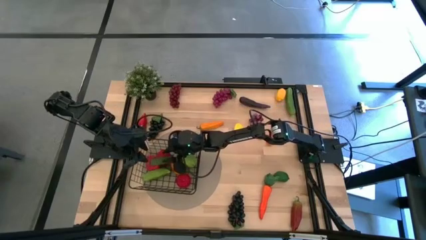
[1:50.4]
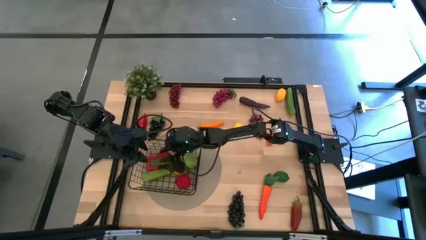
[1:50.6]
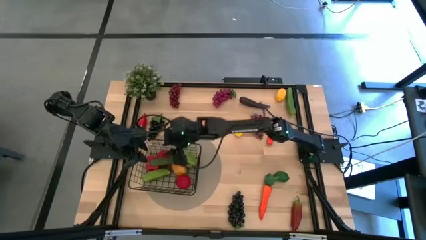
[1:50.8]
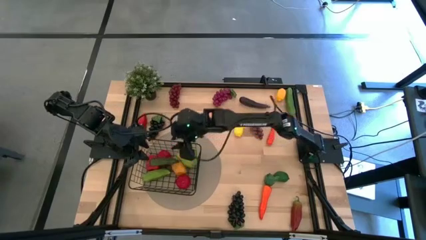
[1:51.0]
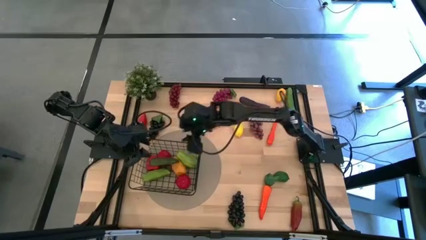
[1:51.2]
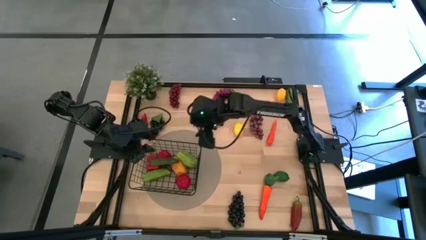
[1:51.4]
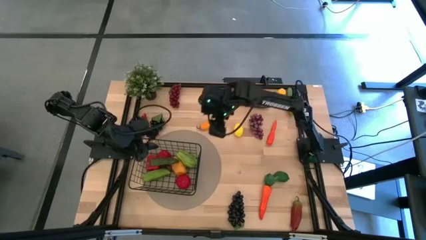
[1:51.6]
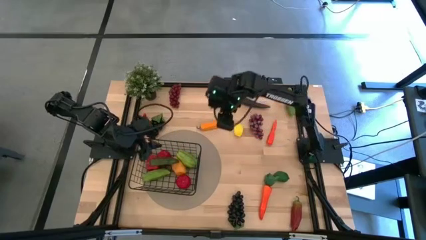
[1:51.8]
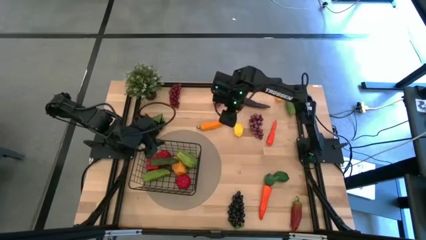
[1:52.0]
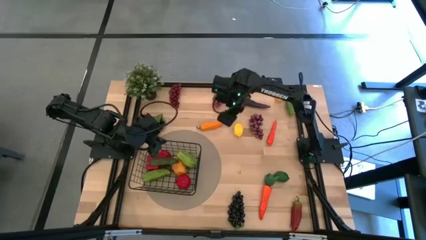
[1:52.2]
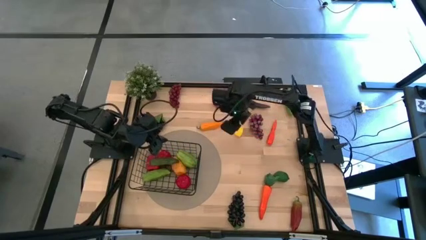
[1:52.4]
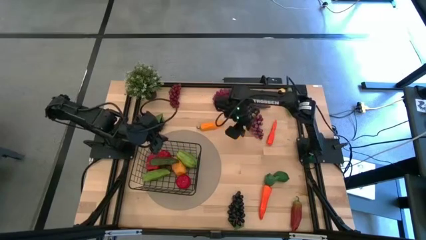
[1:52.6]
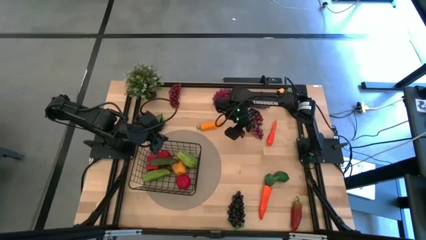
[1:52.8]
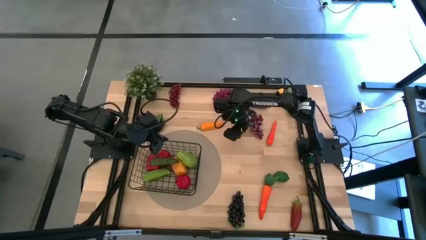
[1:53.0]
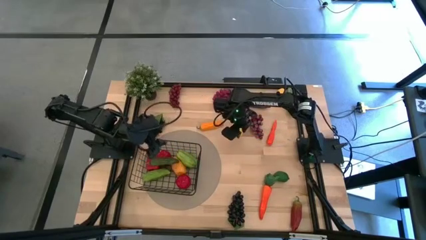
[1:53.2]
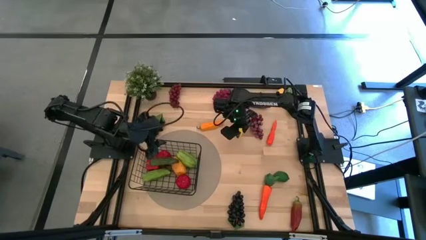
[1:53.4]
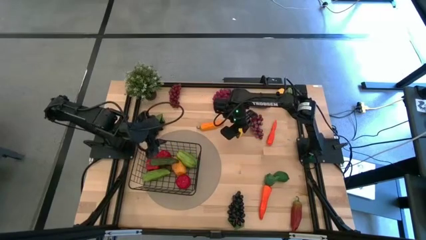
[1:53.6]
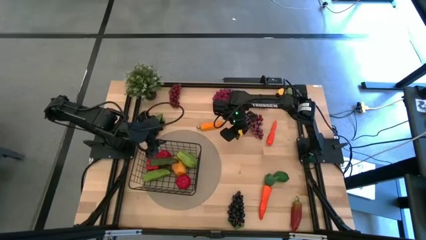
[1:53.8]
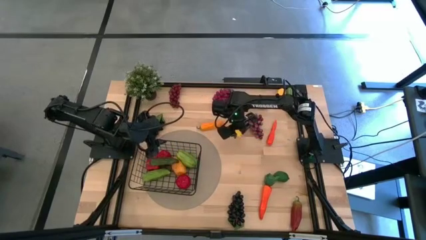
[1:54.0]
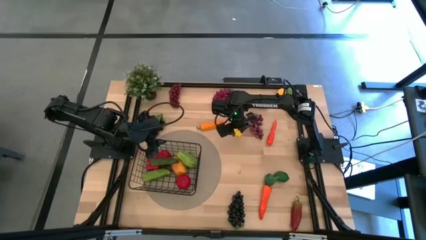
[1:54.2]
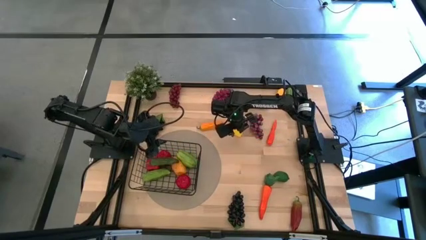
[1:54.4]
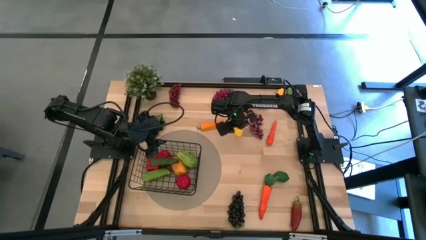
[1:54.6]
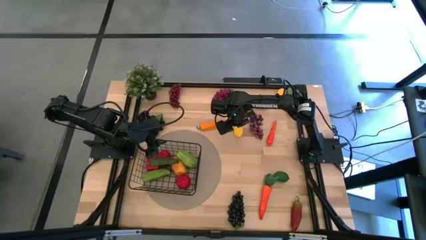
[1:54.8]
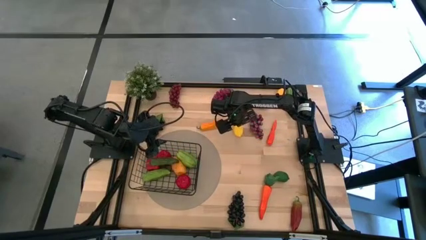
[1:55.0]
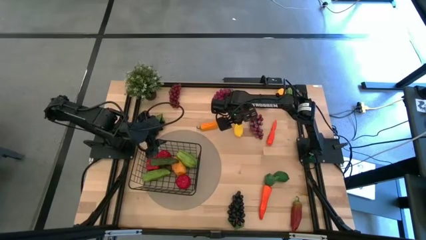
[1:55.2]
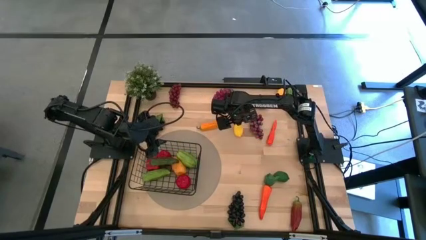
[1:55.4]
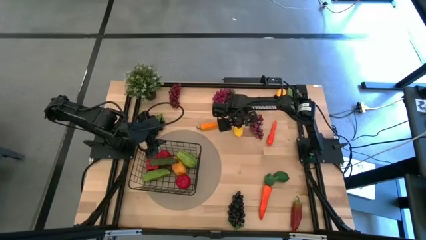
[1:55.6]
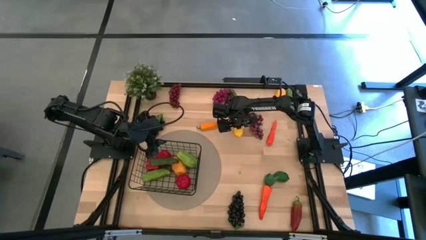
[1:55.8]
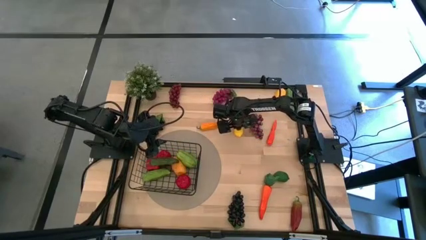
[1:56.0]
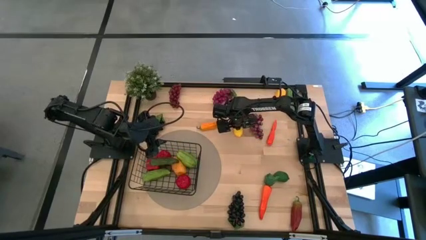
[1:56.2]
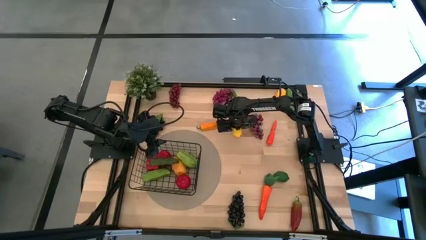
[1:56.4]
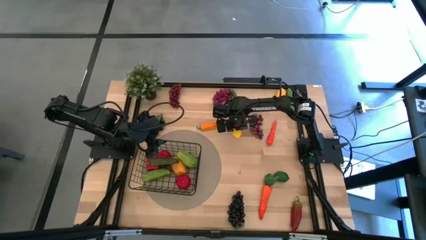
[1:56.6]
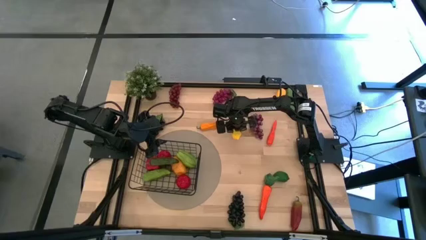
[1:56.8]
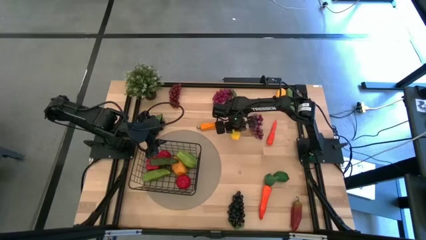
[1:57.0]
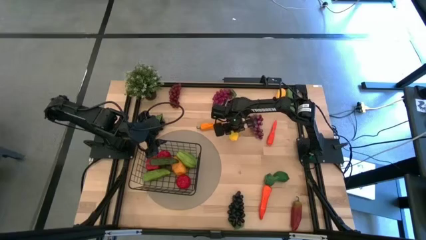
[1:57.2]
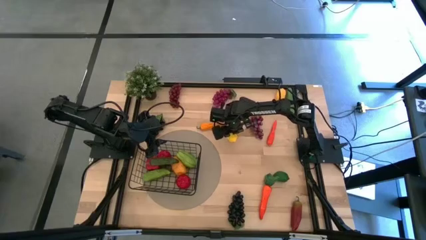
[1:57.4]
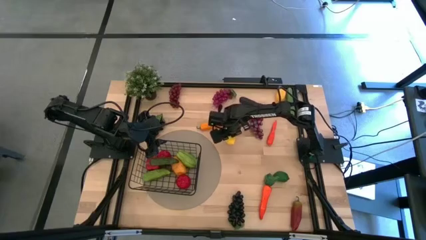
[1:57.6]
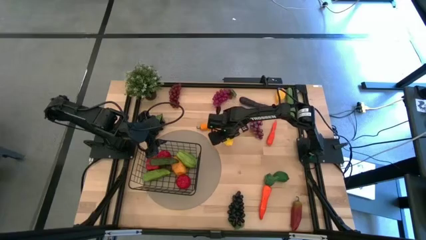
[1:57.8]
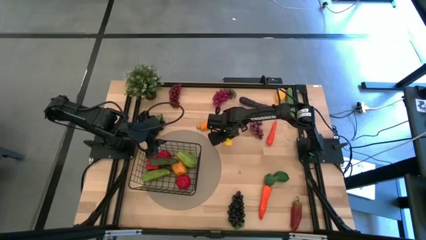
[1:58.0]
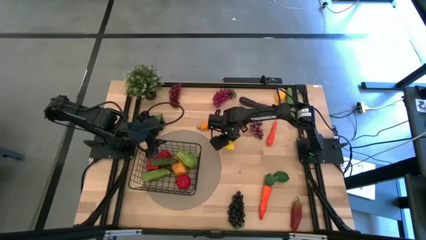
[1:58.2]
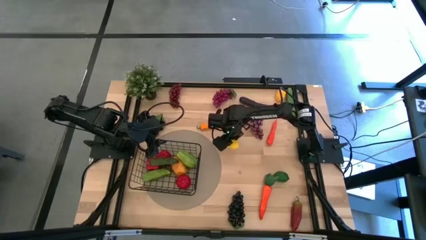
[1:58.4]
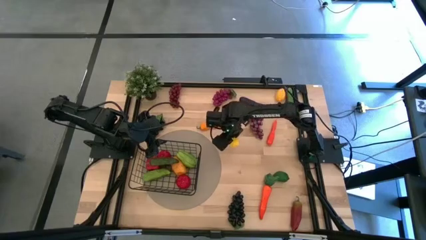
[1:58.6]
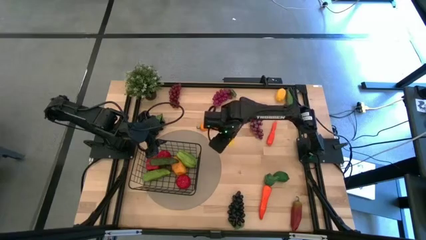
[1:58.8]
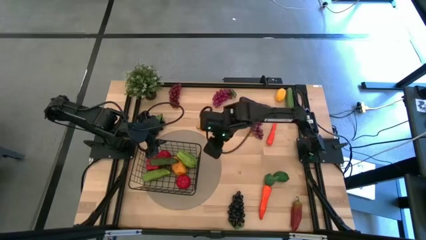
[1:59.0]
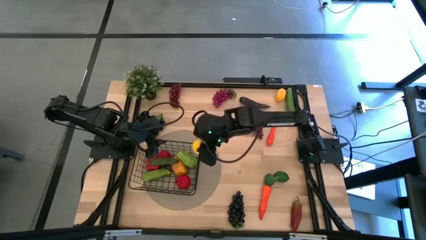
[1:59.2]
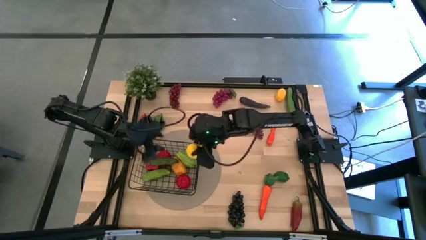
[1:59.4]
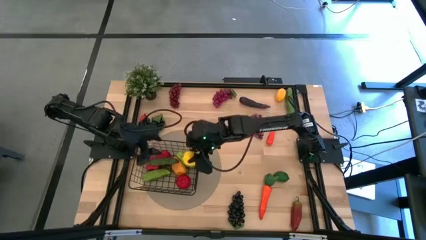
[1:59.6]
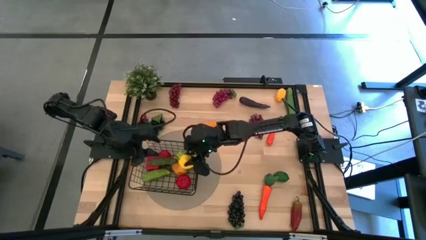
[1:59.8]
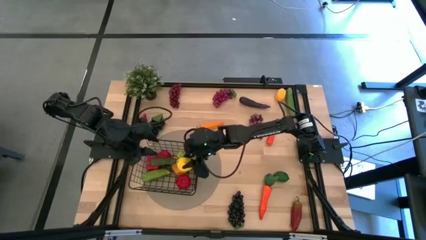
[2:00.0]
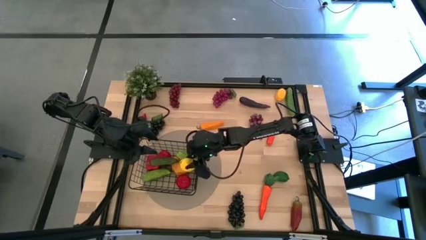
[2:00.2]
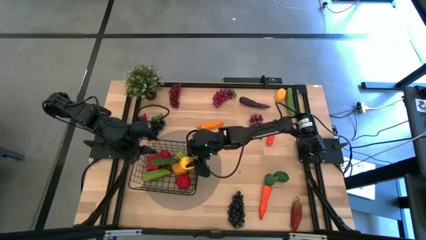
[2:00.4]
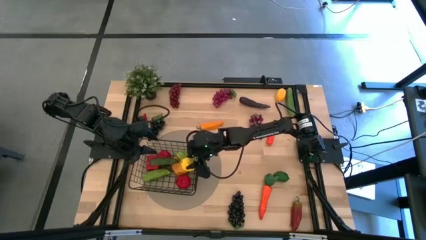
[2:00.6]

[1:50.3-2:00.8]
Task: Build produce basket
Put the bottom yellow lemon into the black wire basket
